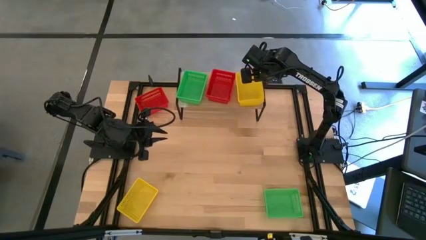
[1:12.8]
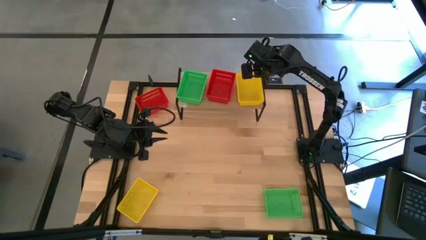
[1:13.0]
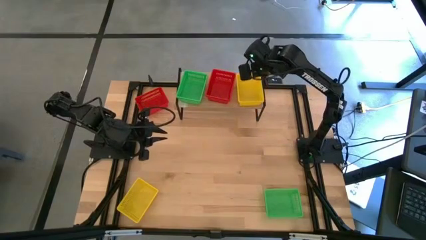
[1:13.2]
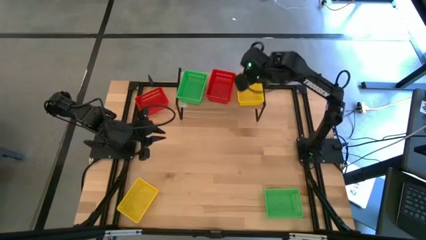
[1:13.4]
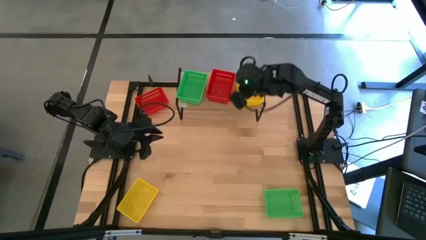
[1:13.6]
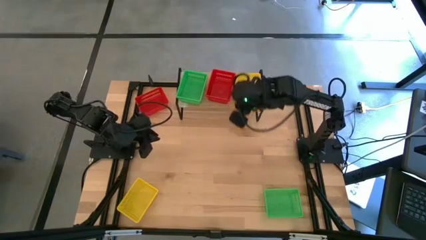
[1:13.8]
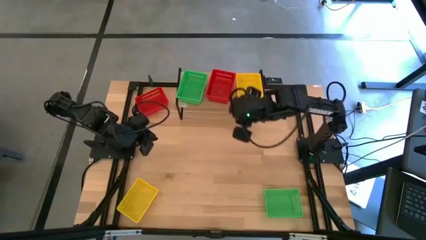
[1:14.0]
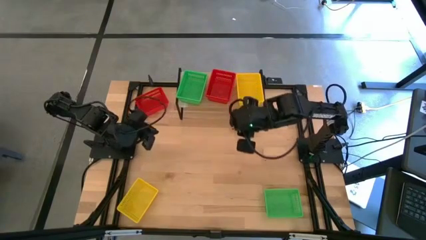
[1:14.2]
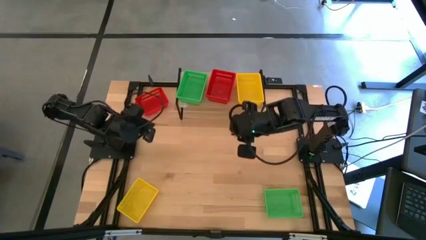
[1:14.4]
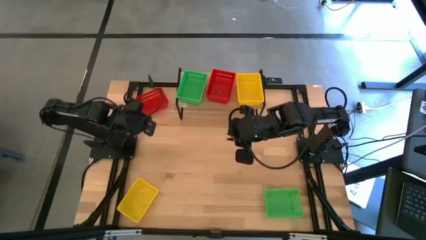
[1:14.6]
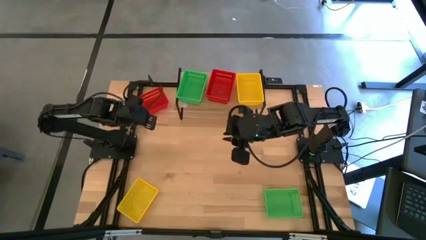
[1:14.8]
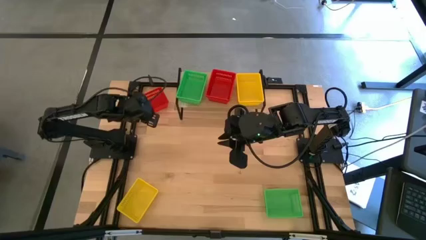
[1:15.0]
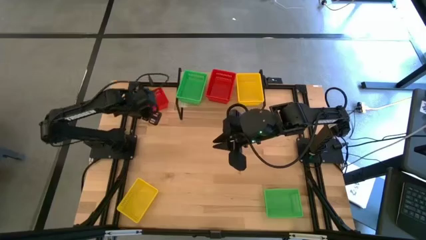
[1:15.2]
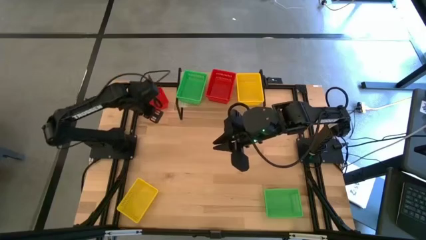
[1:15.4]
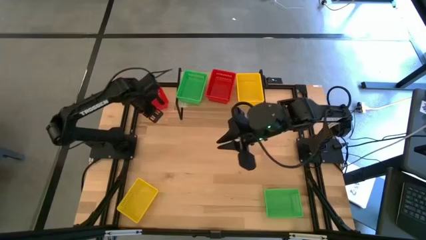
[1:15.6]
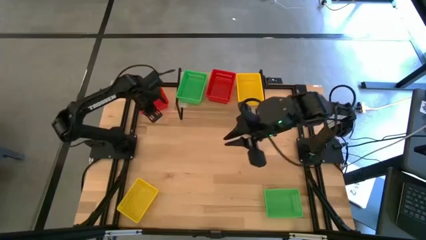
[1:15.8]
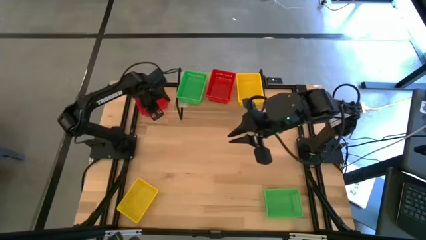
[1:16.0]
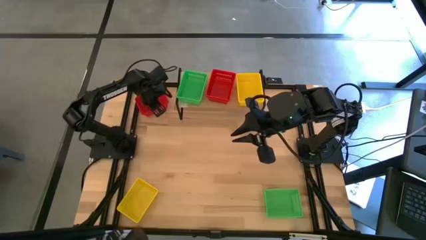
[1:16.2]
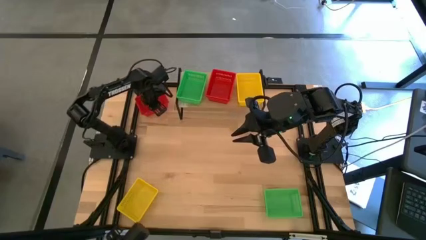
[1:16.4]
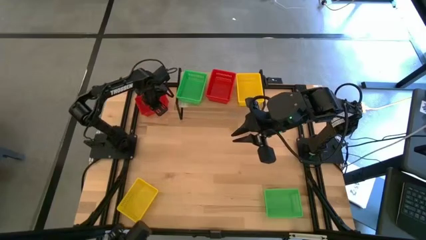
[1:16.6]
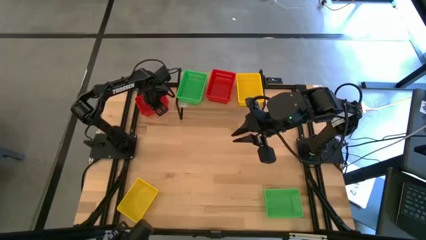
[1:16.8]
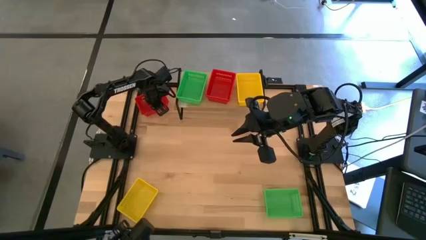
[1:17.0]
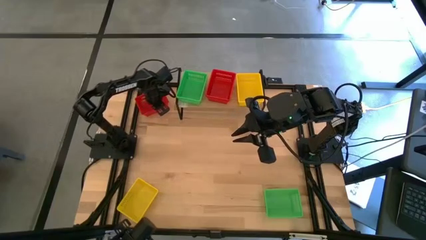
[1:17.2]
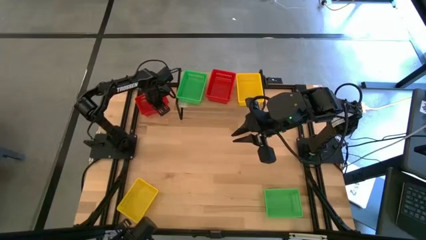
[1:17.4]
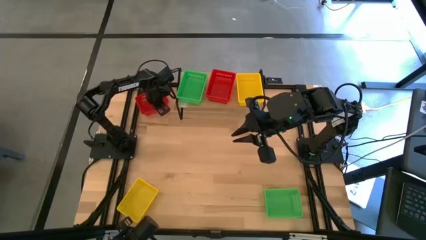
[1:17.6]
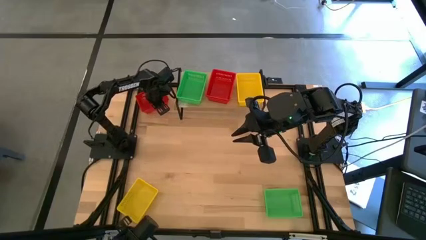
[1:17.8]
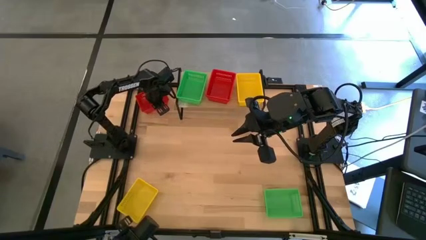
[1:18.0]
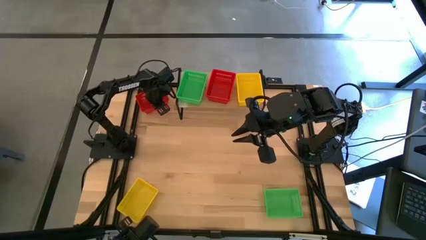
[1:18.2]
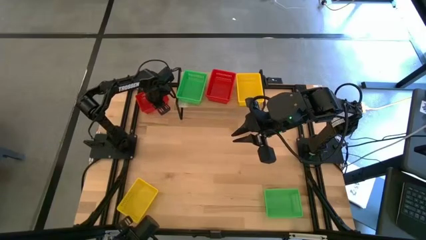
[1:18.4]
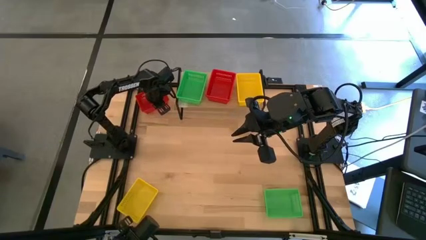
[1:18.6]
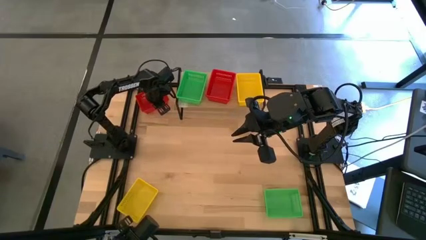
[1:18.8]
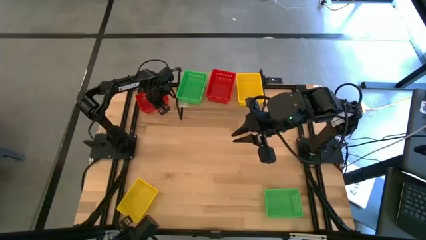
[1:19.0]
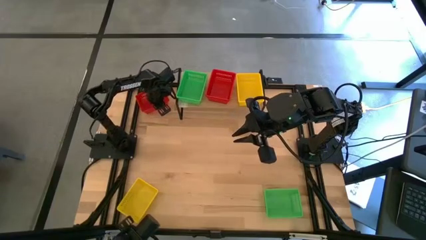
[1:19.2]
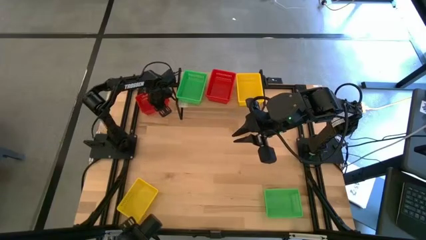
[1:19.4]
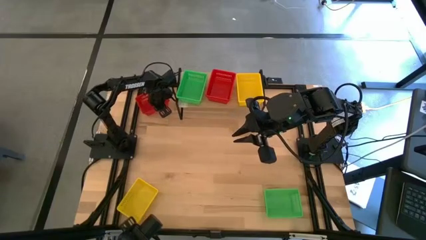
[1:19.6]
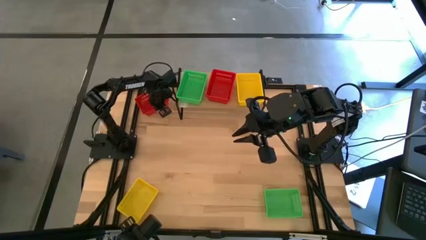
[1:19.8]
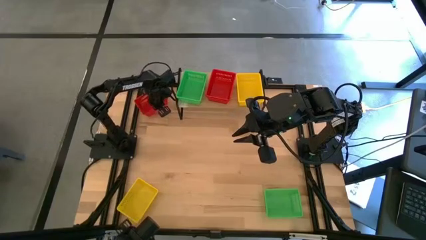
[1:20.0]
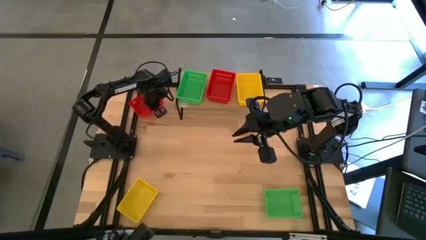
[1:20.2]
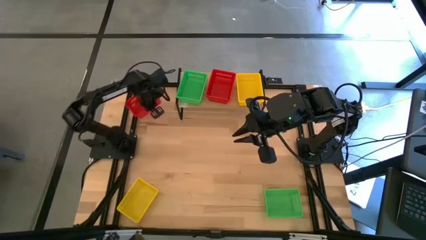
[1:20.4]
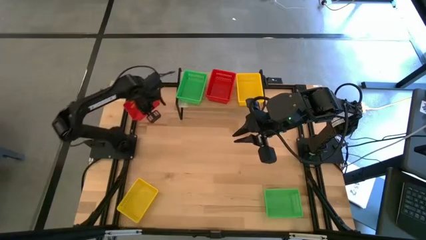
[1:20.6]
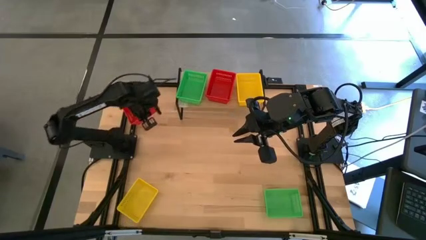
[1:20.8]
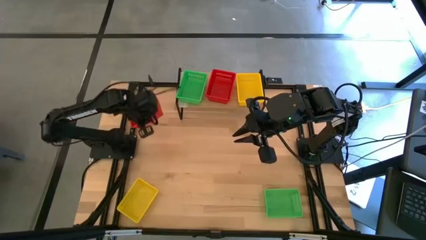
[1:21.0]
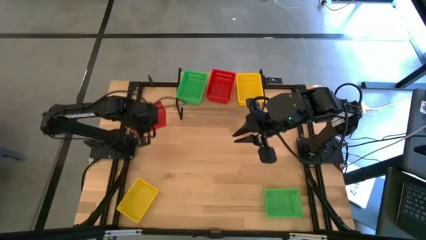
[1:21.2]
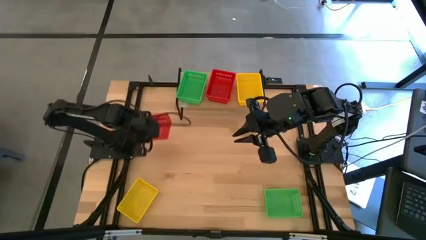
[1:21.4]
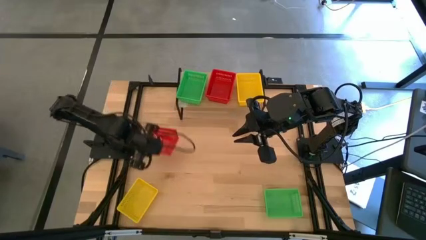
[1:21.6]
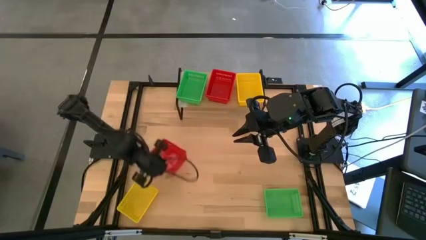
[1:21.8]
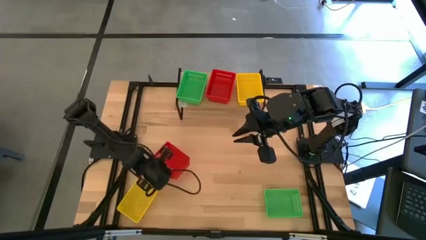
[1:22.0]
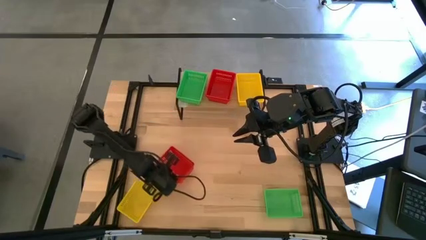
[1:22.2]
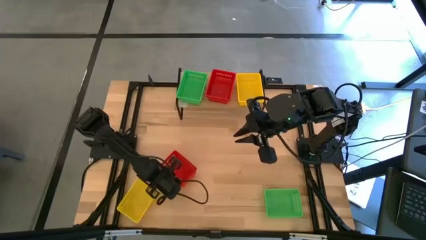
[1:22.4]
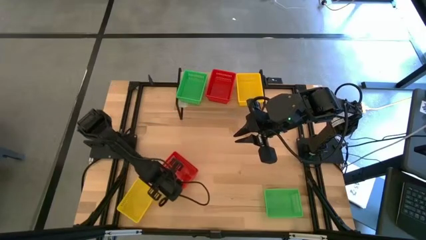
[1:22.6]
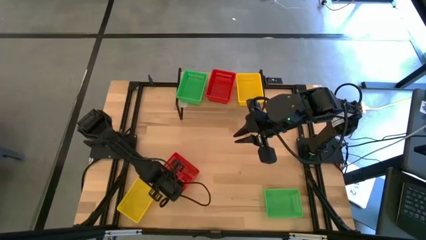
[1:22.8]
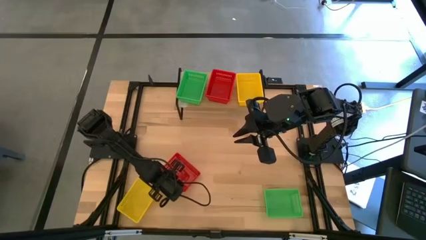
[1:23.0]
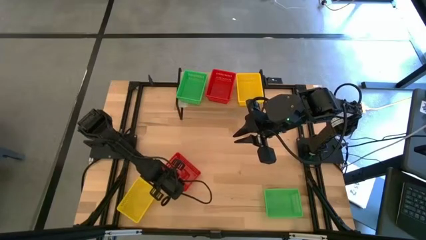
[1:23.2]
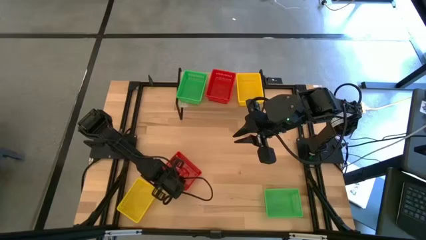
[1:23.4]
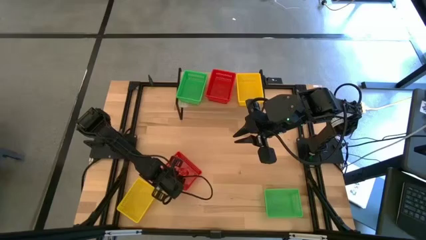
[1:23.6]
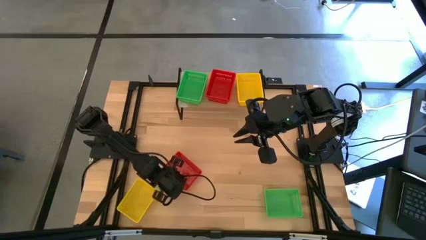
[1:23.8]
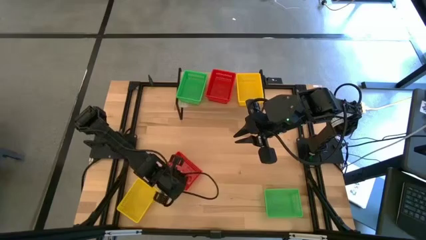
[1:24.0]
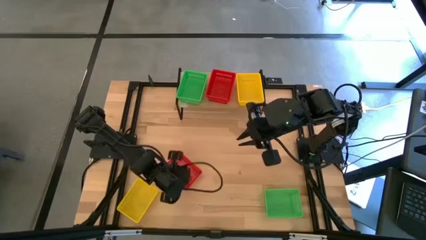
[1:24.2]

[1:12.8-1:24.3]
Task: Stack baskets on shelf by color
Stack the red bin on top of the red bins on the shelf

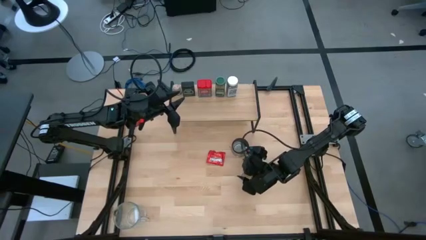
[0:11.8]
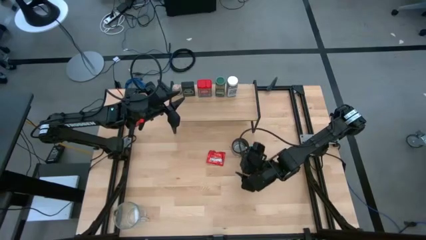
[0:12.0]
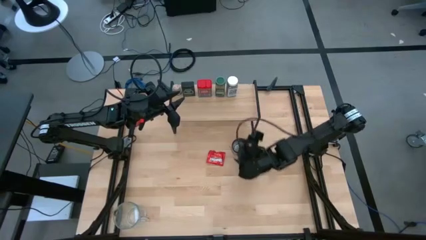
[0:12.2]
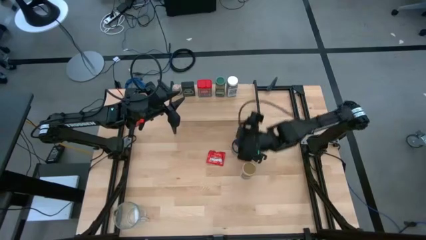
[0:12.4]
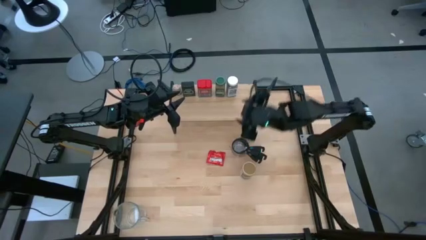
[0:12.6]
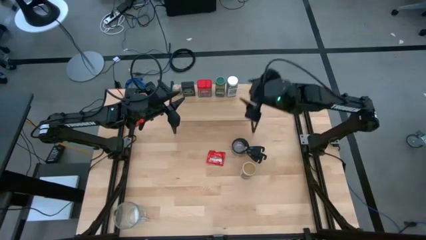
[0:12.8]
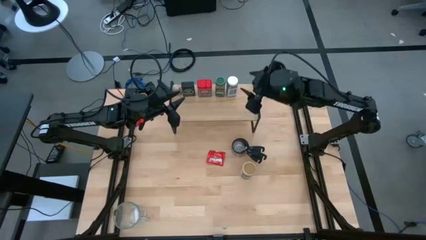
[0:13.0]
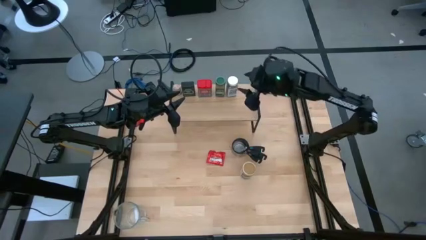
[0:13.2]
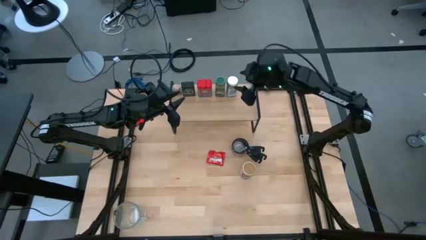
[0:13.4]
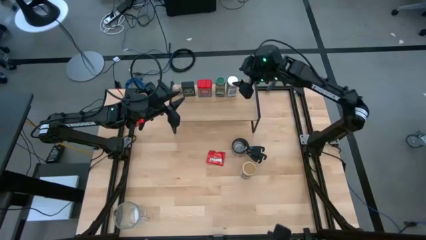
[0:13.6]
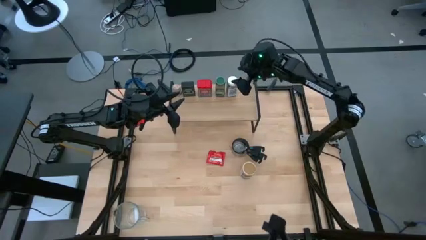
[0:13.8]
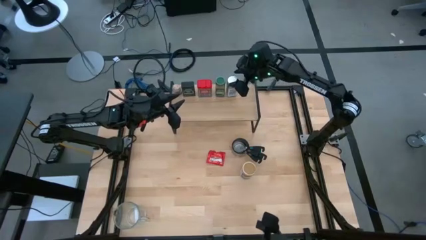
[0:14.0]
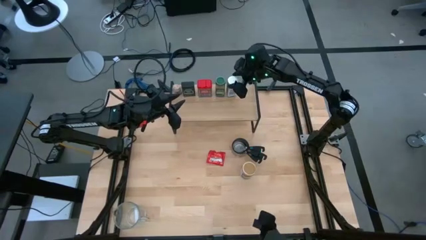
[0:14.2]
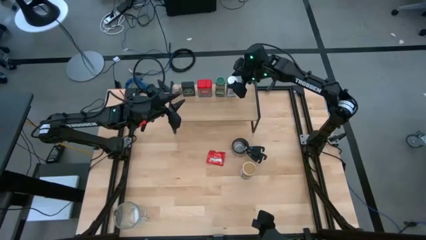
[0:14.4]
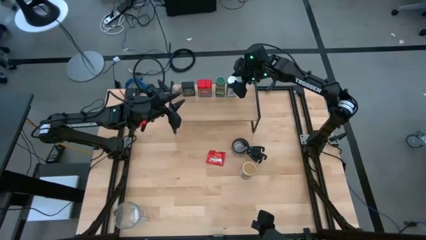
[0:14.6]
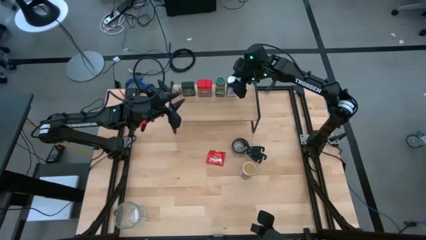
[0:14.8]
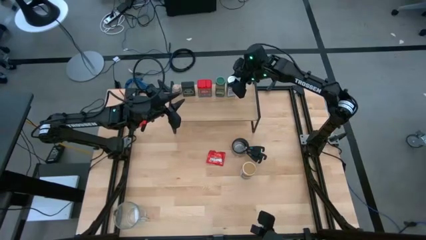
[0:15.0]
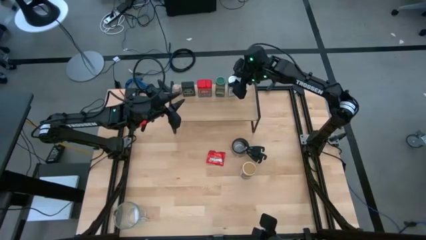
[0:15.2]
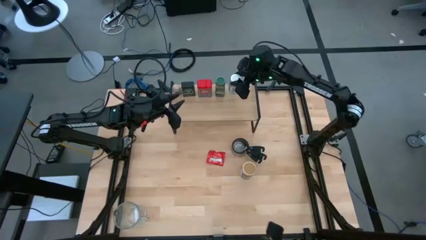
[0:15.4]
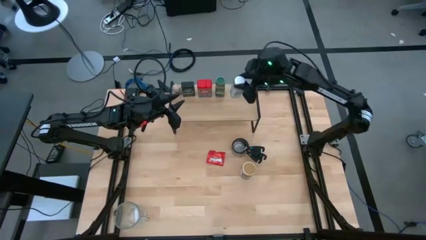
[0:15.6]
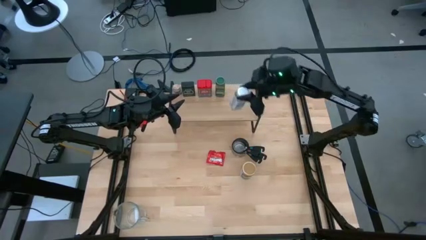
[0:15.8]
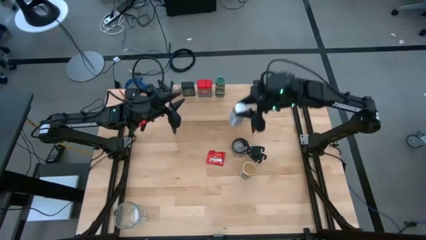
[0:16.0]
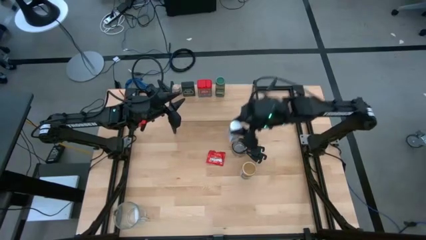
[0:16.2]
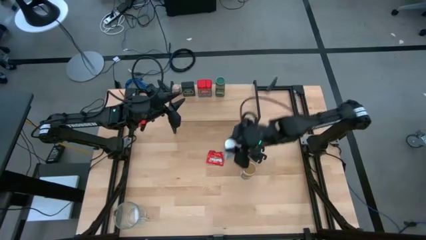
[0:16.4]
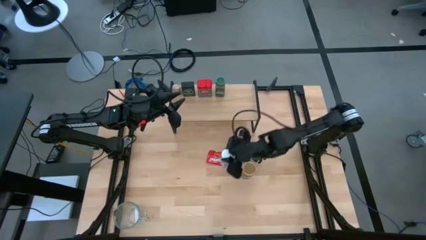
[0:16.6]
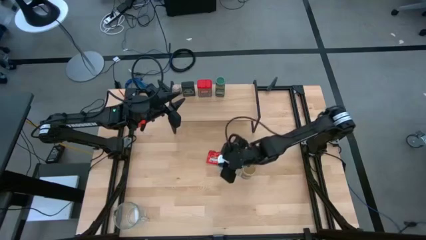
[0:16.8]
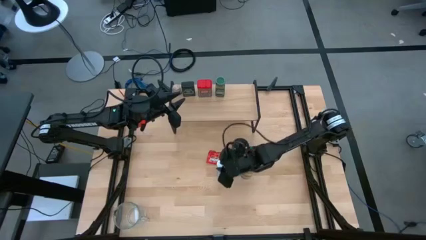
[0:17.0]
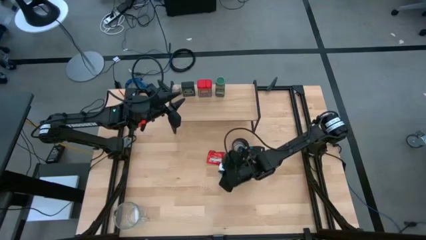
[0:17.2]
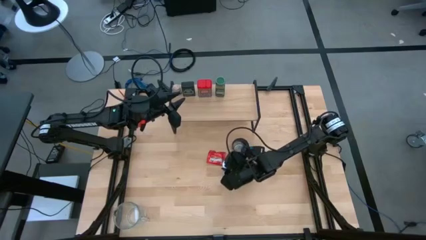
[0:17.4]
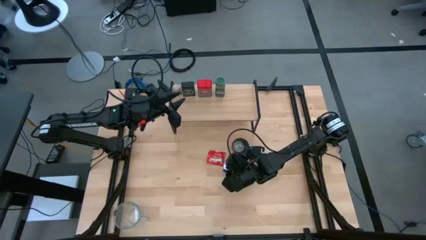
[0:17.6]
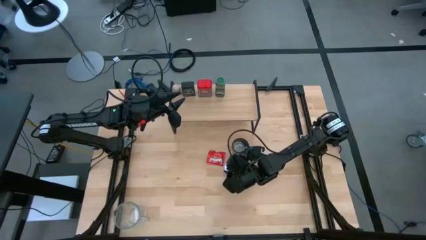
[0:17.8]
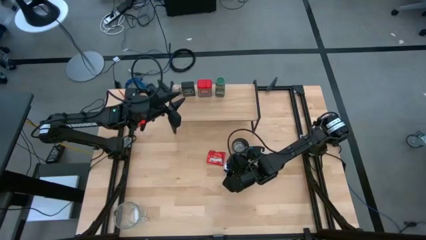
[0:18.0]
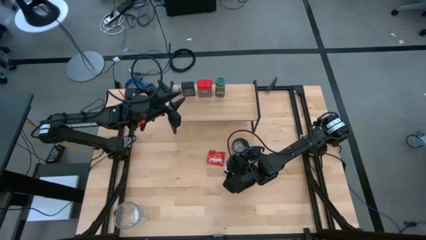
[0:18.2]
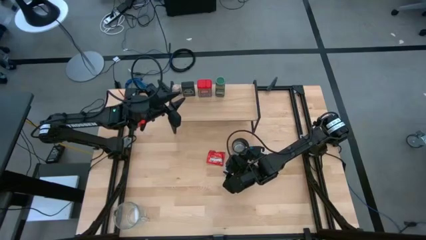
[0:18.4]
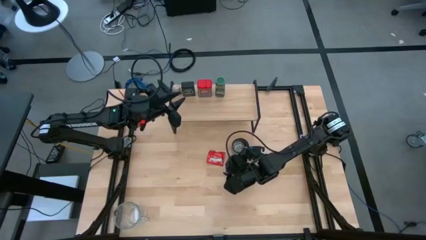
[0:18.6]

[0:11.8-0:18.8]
Task: Shelf spices
Remove the white seasoning bottle from the shelf
